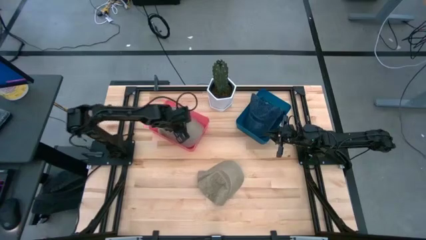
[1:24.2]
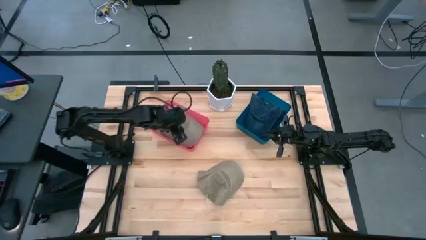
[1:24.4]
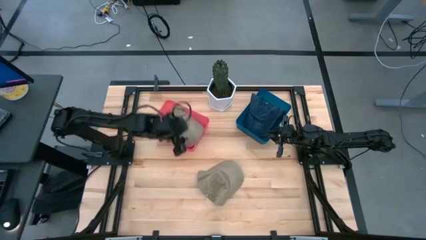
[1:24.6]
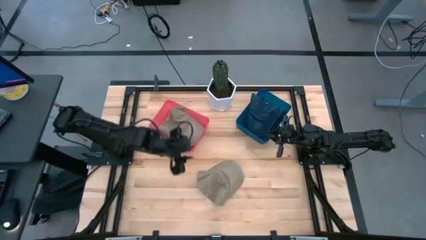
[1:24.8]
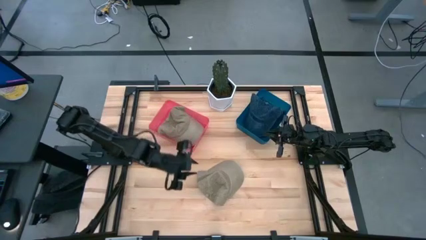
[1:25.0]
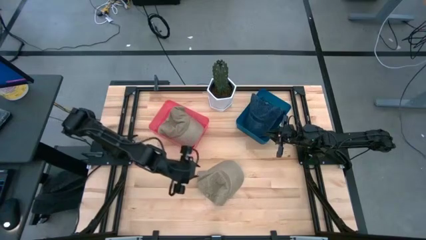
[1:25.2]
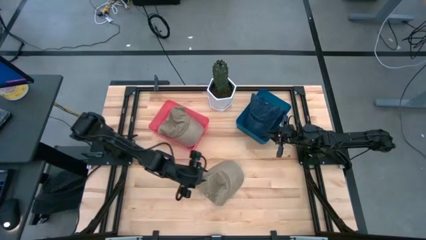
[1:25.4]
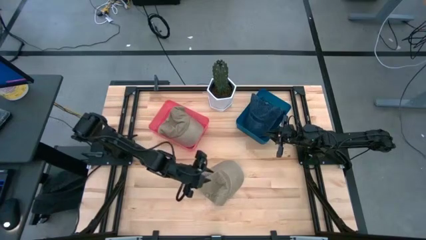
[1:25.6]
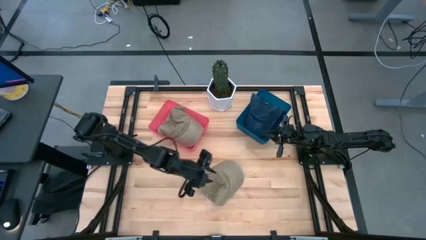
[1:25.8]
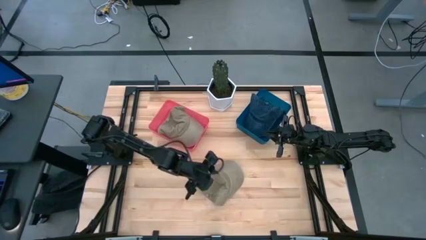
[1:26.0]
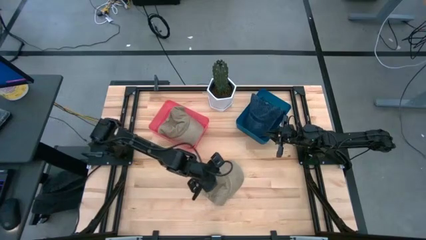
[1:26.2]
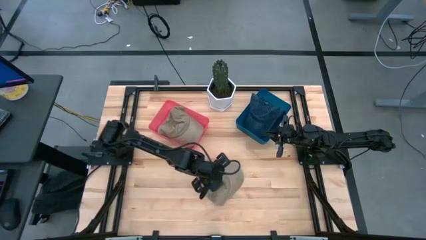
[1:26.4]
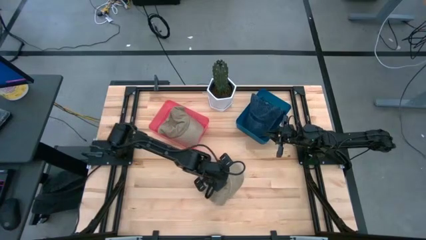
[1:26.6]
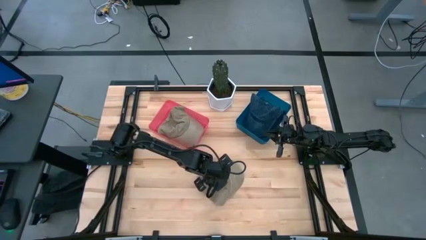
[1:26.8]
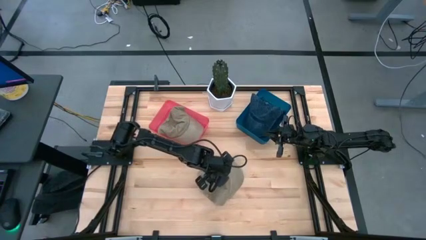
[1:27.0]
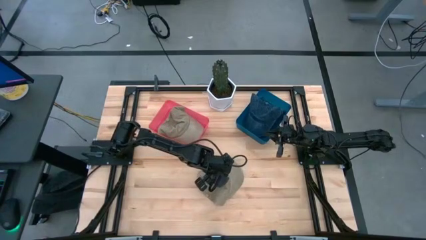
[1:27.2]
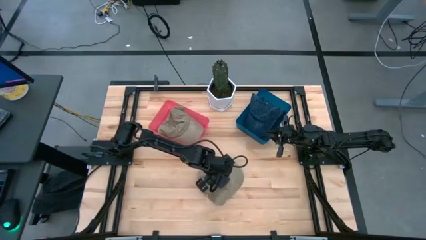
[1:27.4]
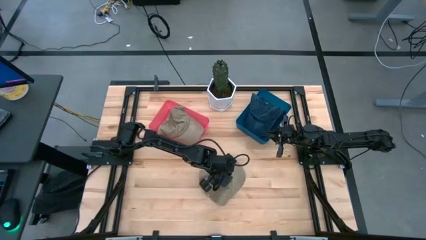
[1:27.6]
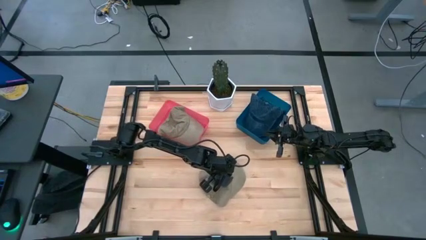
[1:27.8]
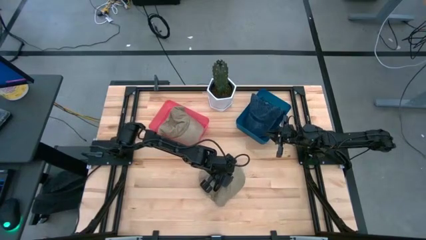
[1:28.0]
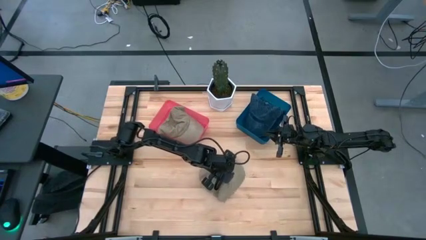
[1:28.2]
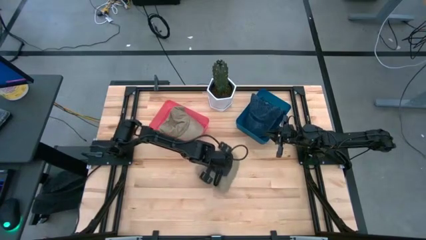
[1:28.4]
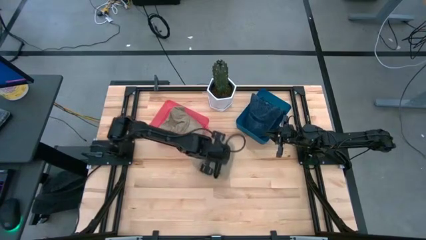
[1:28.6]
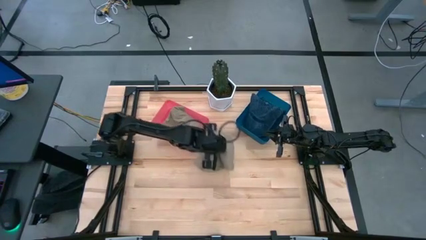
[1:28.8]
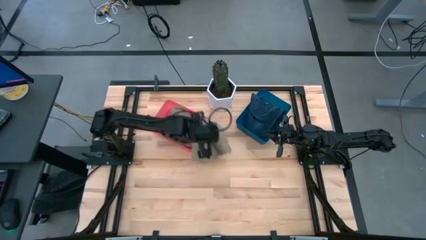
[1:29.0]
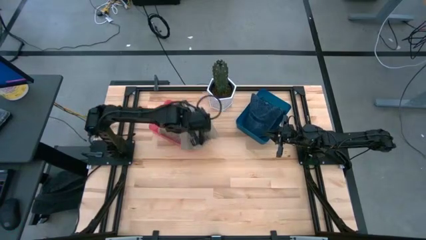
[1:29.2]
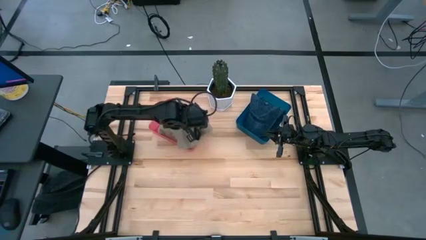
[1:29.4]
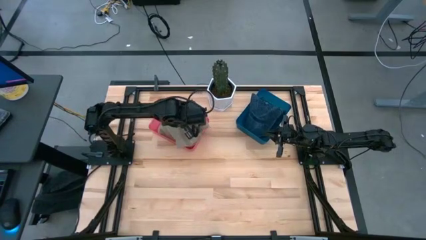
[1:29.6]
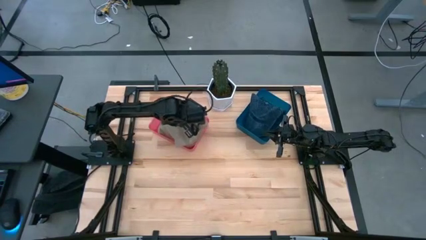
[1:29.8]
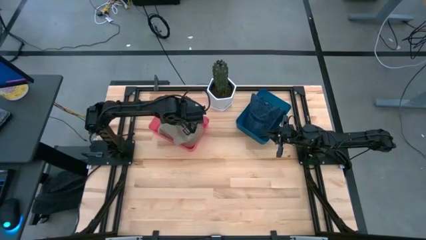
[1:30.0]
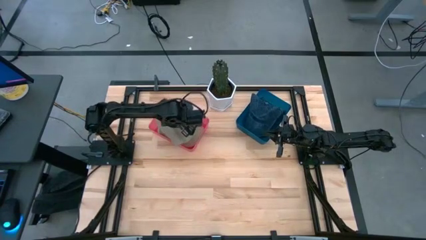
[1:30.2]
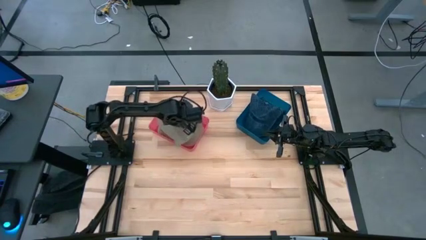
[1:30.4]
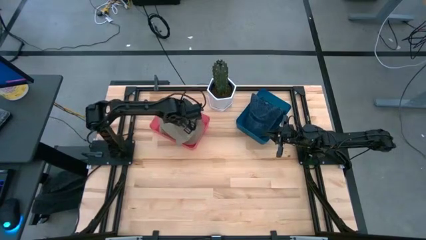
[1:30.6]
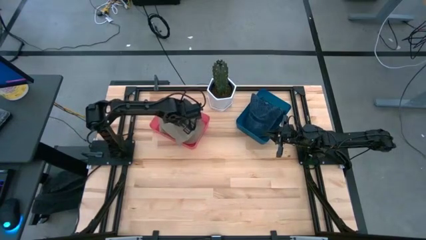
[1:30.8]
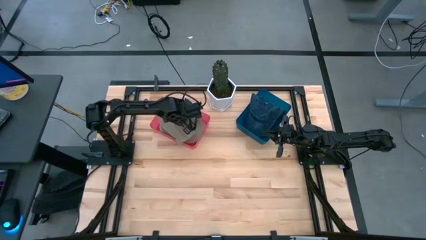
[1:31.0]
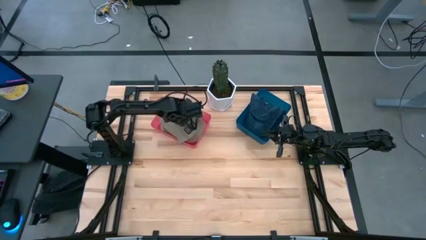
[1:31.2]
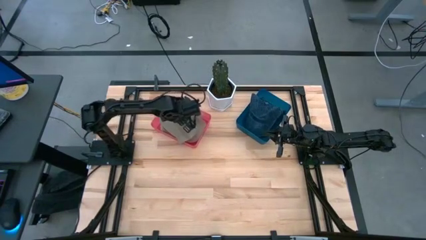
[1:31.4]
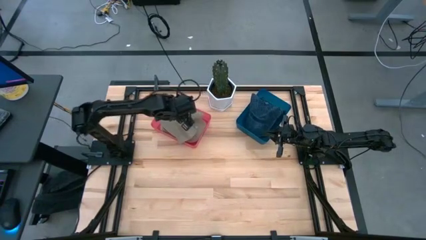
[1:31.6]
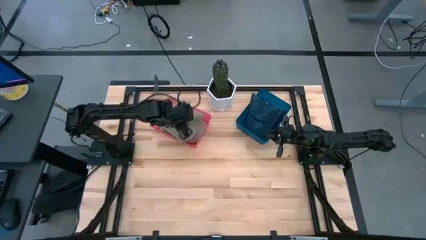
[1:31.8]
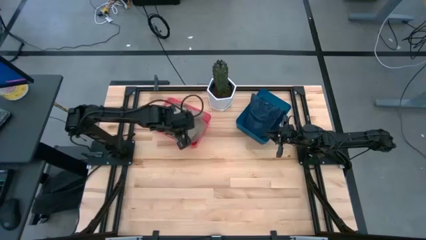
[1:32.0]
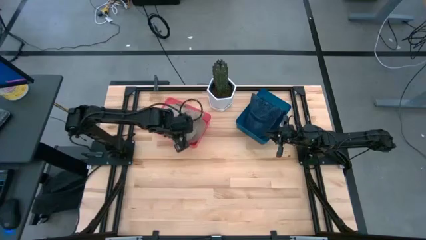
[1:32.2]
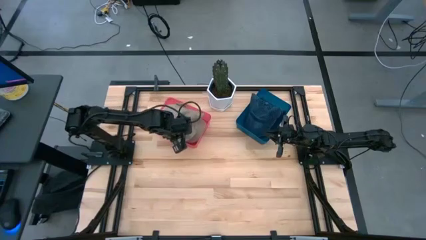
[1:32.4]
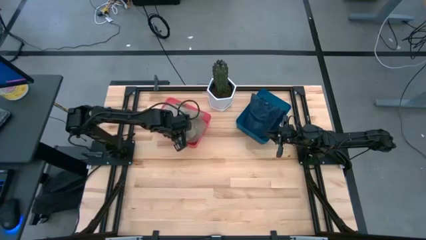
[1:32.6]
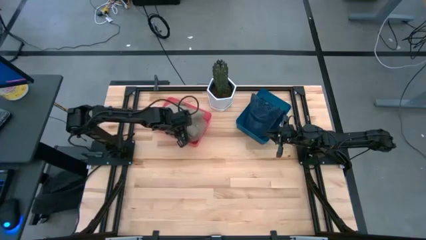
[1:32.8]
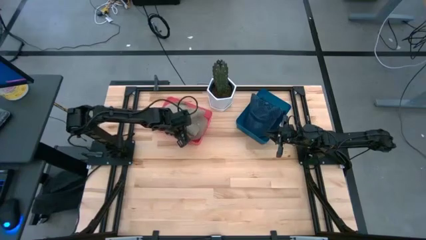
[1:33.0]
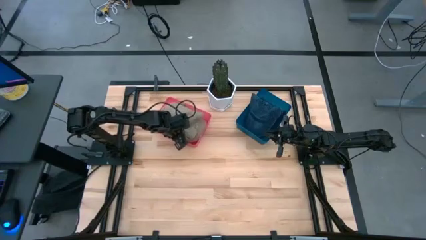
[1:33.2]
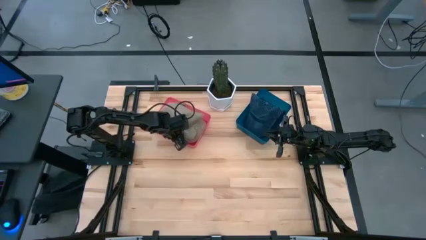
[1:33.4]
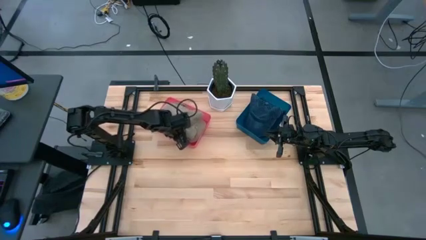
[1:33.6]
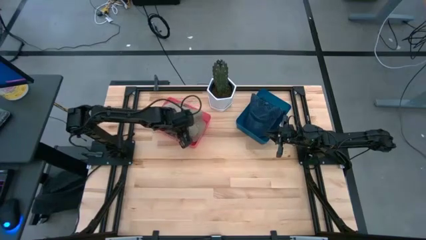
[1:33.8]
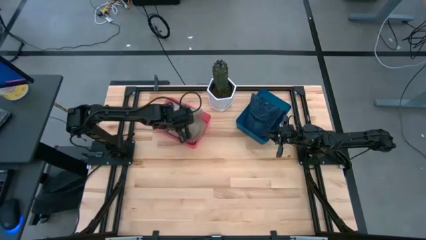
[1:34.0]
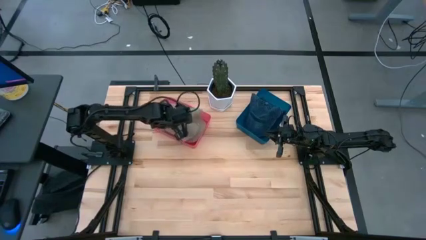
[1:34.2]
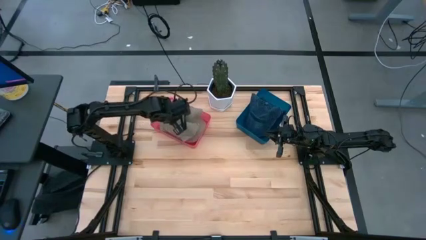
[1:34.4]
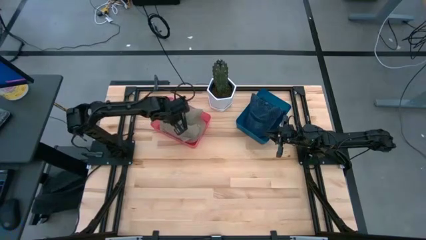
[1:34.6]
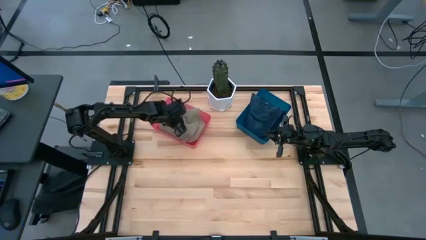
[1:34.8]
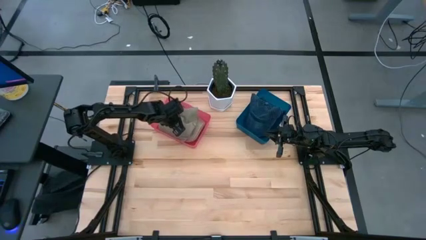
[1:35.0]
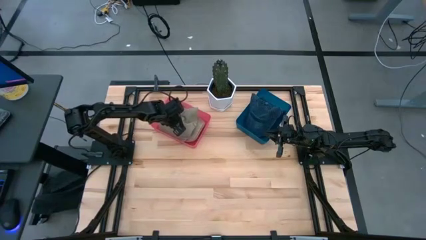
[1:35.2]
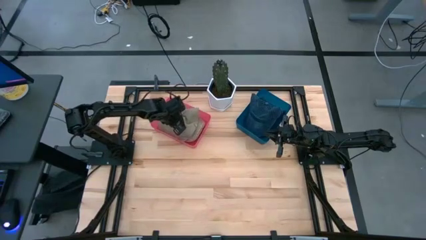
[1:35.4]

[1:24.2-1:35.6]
Task: Pick & Place hat
Put the brown cap into the red bin

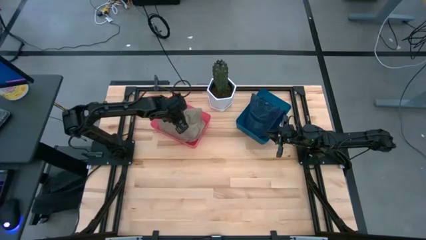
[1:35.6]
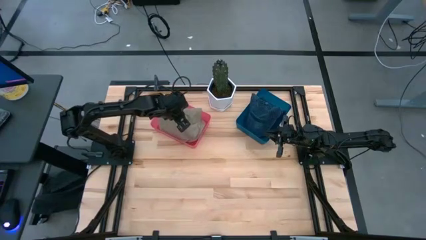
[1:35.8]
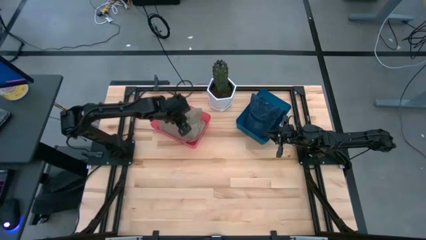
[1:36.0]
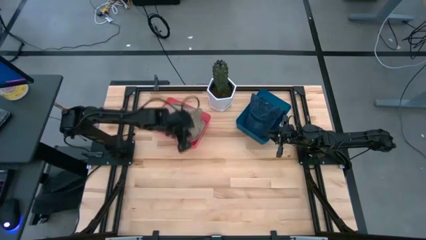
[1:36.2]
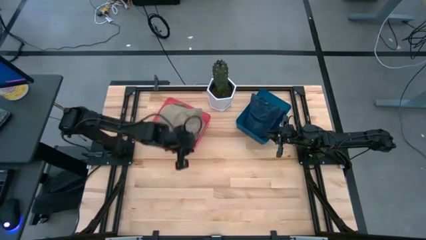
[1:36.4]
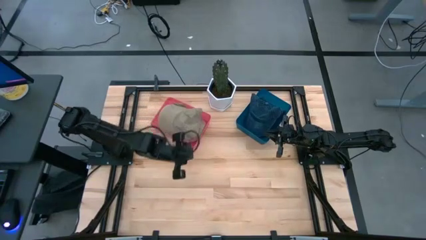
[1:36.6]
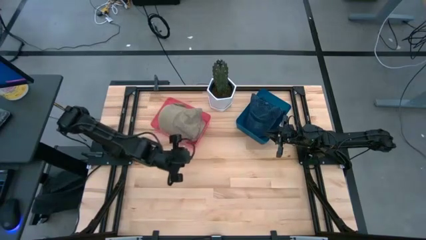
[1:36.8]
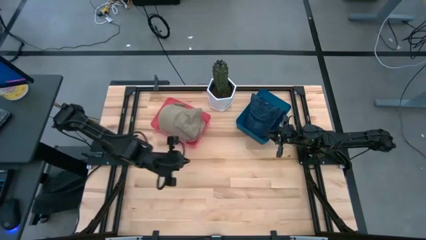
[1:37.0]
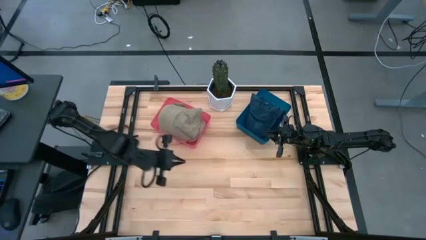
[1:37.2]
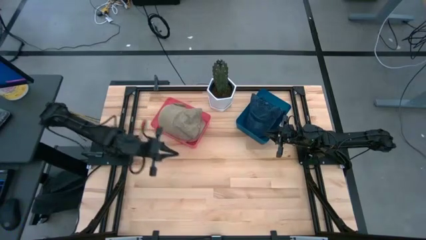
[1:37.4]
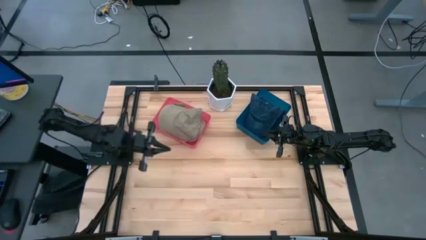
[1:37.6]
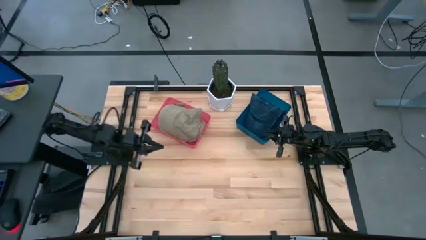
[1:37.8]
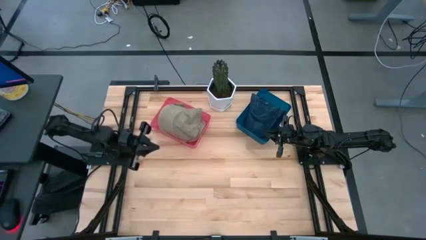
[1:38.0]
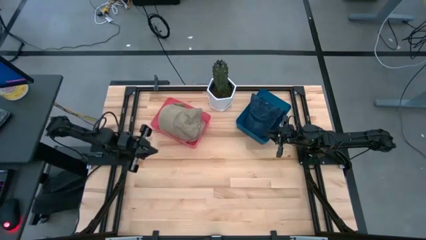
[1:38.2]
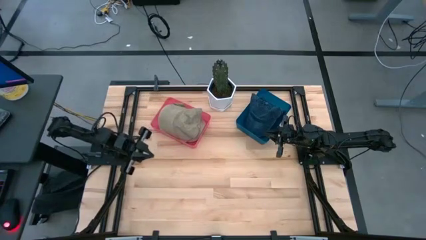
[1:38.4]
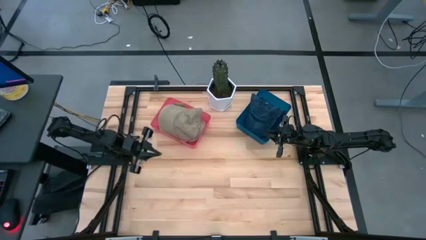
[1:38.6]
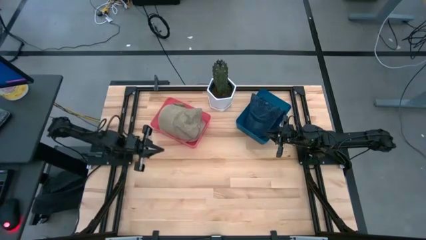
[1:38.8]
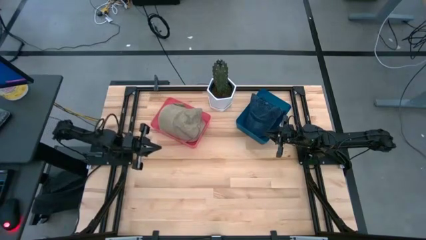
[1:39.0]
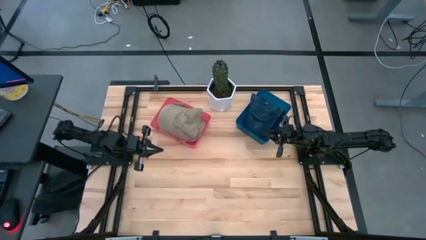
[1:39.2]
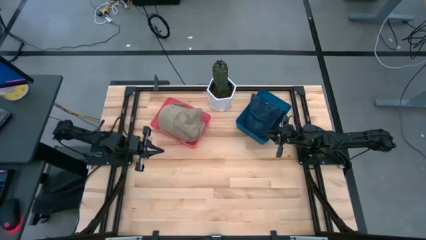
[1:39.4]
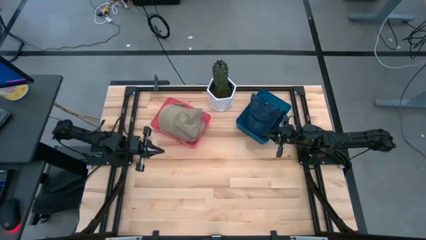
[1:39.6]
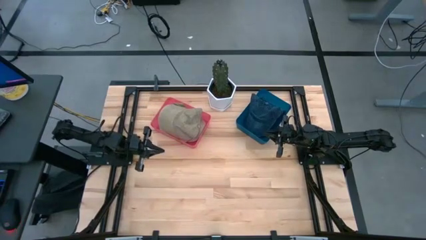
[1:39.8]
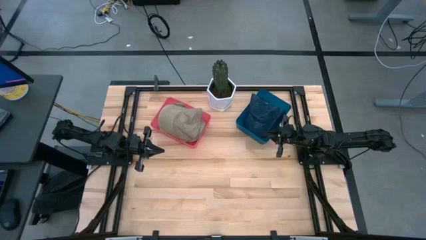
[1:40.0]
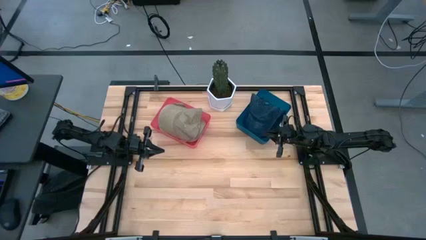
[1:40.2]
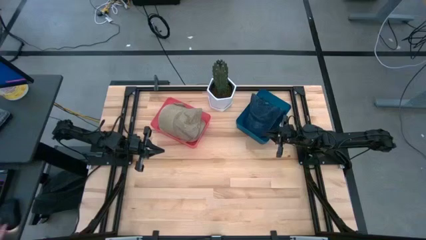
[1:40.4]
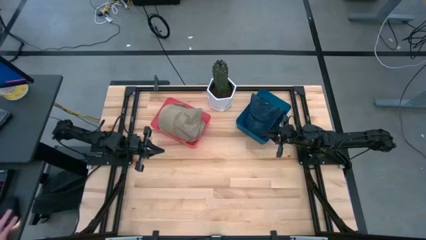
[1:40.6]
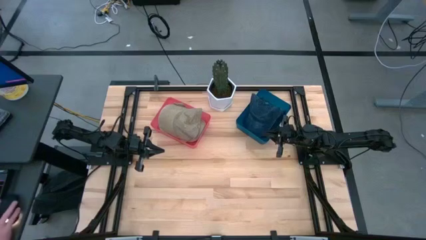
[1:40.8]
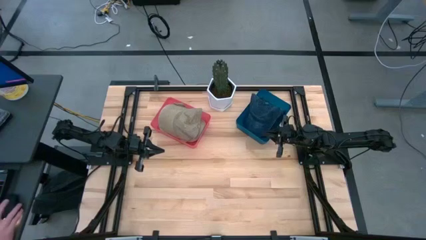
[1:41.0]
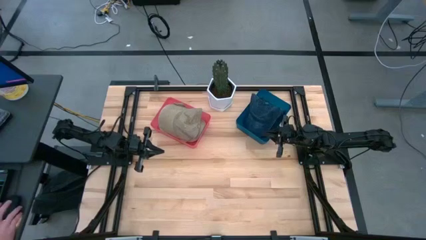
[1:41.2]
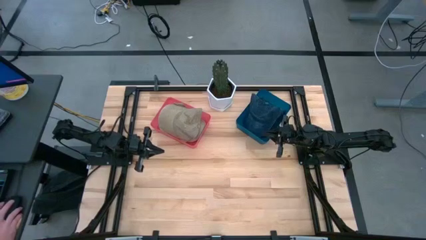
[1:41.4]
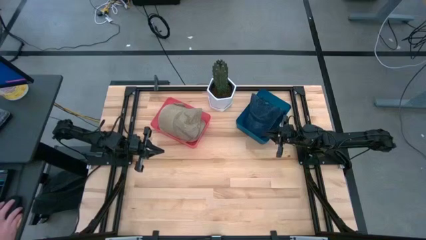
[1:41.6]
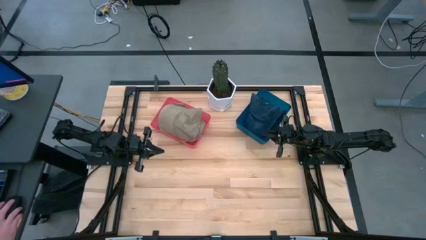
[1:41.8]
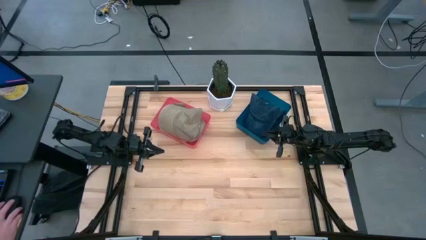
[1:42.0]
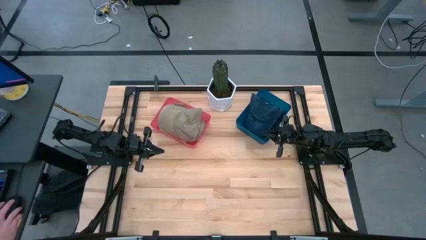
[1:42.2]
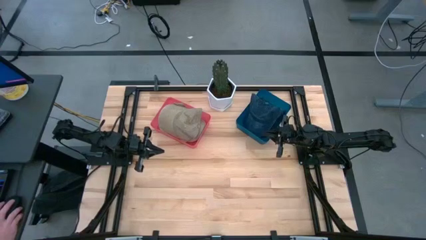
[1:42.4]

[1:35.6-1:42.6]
Return to Home Position
